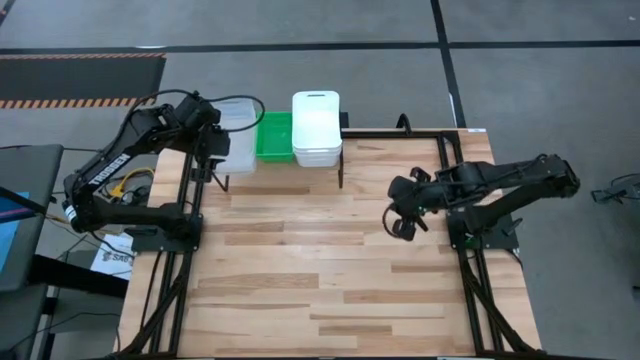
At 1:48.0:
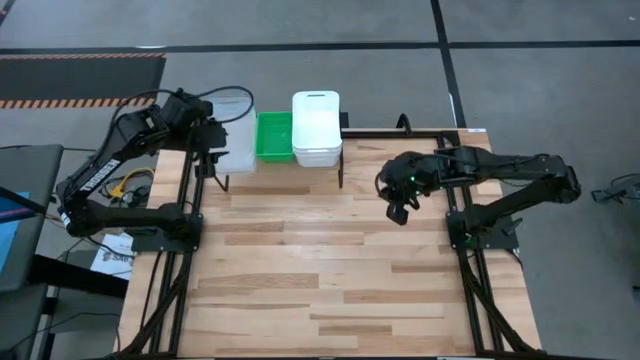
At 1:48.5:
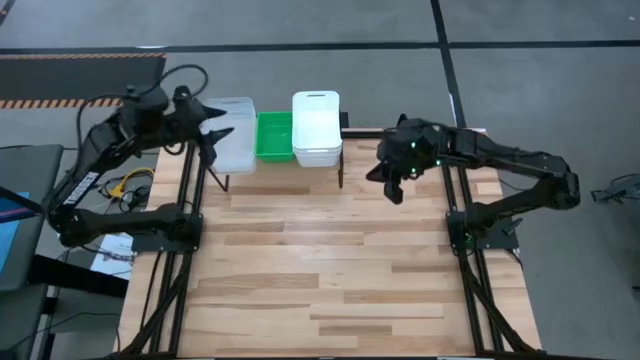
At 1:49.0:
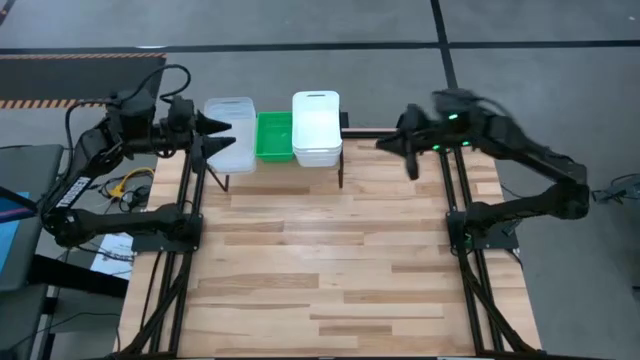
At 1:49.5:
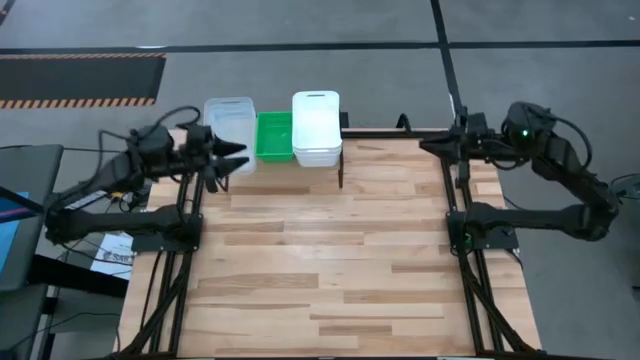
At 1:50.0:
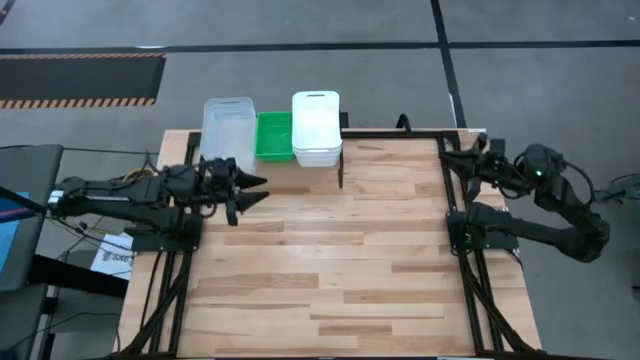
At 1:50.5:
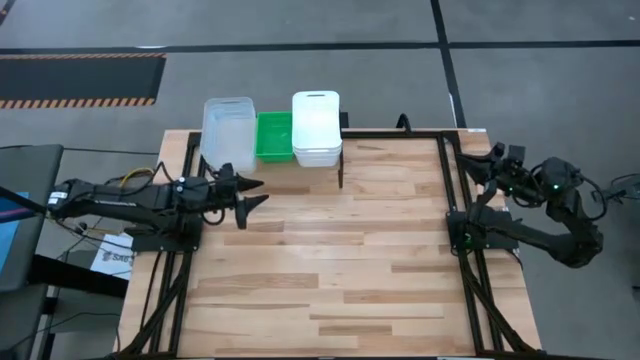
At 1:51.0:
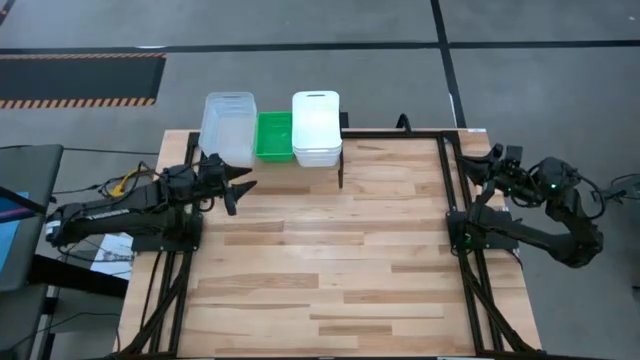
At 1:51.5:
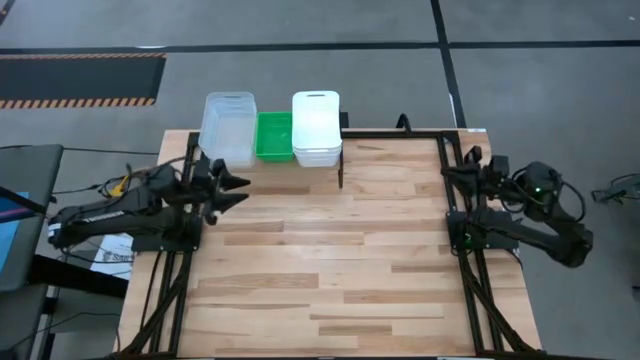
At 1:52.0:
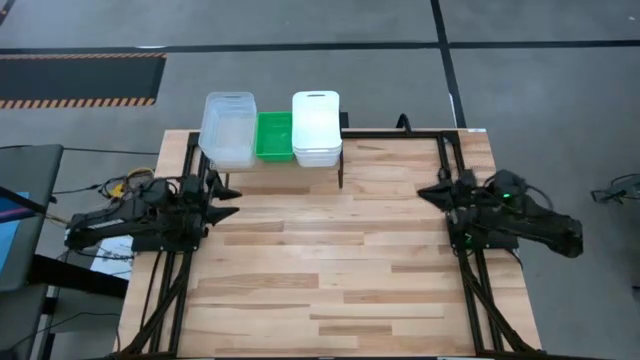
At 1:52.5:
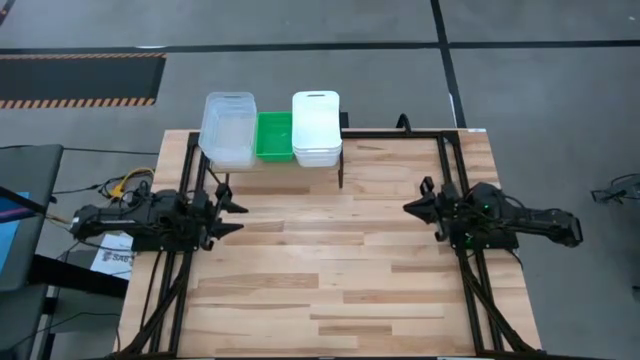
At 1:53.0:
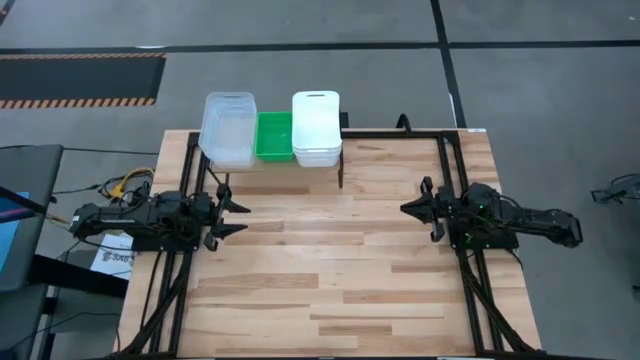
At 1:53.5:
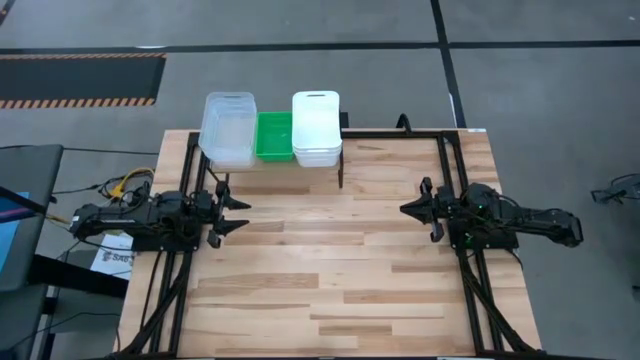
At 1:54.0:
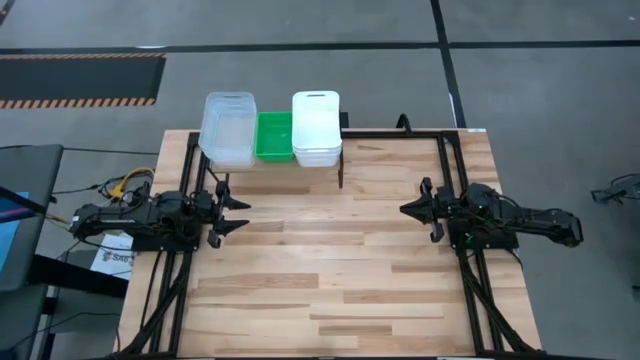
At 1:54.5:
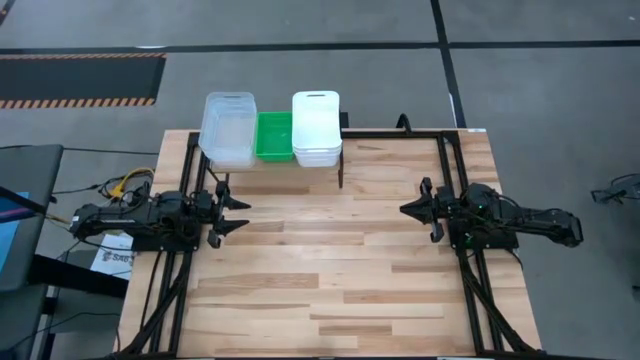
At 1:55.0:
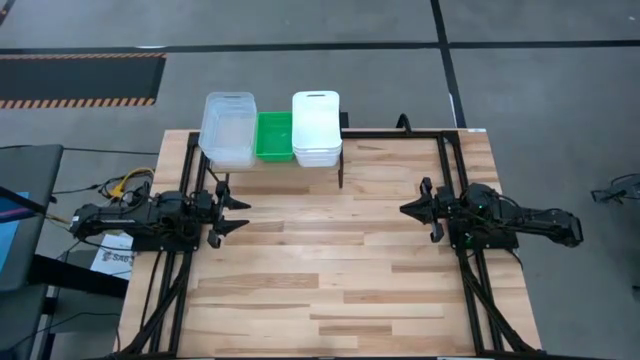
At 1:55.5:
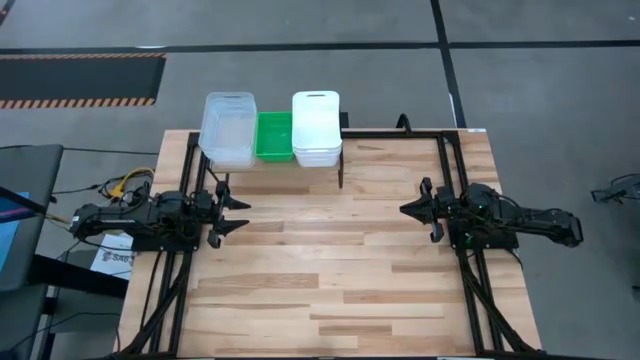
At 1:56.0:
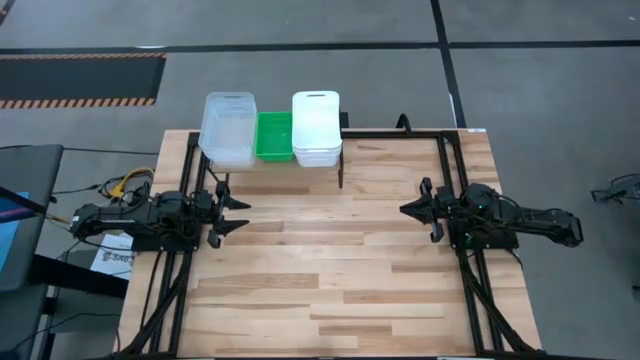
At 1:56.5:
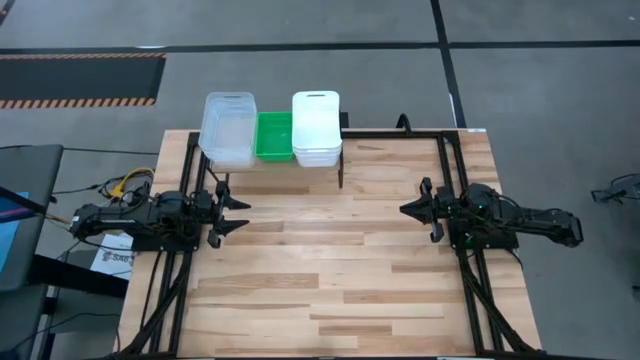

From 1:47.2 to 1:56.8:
Task: Stack baskets on shelf by color
Return to Home Position

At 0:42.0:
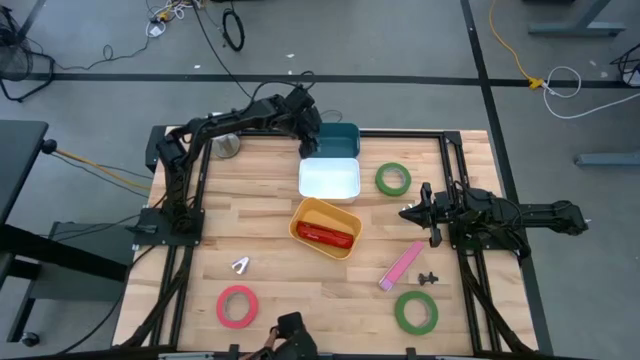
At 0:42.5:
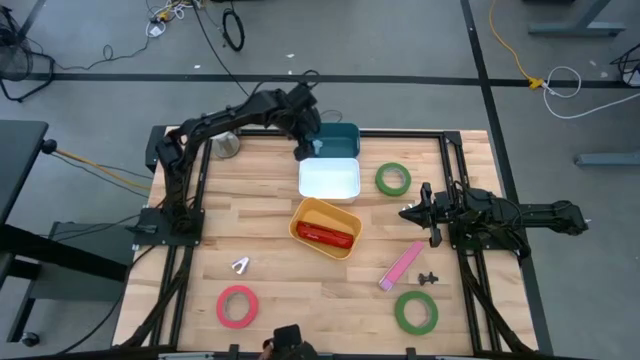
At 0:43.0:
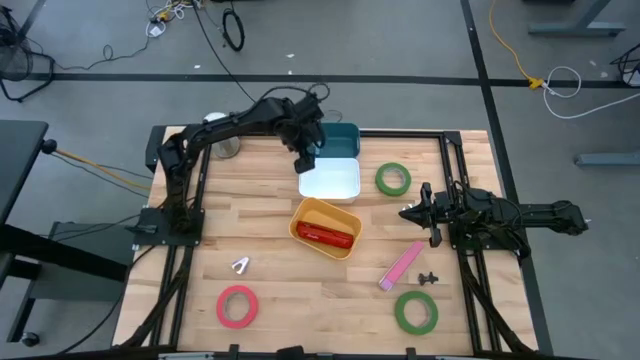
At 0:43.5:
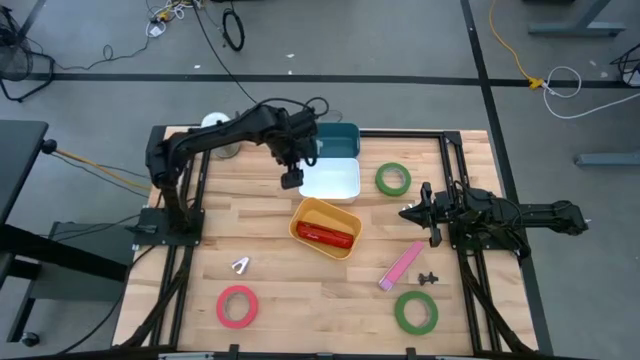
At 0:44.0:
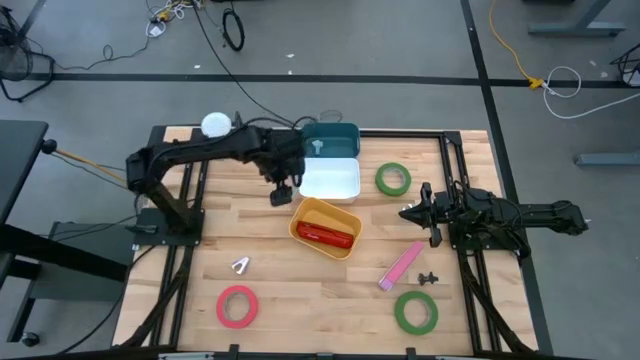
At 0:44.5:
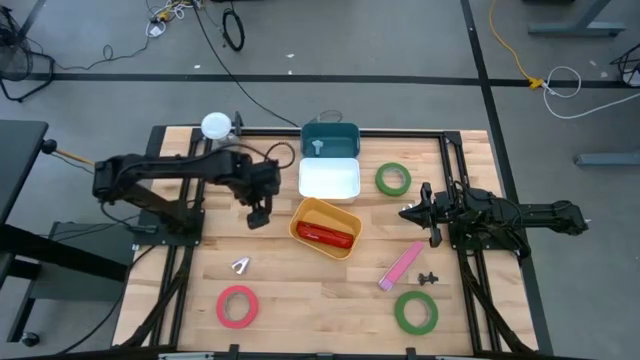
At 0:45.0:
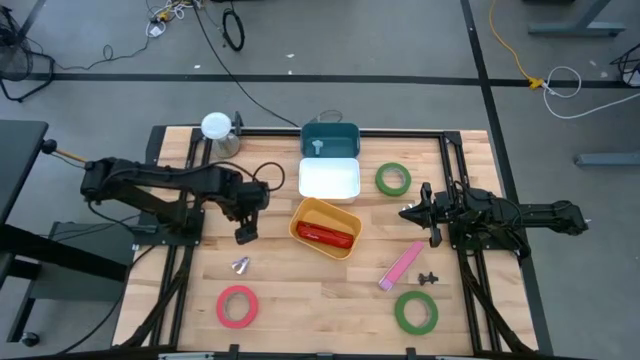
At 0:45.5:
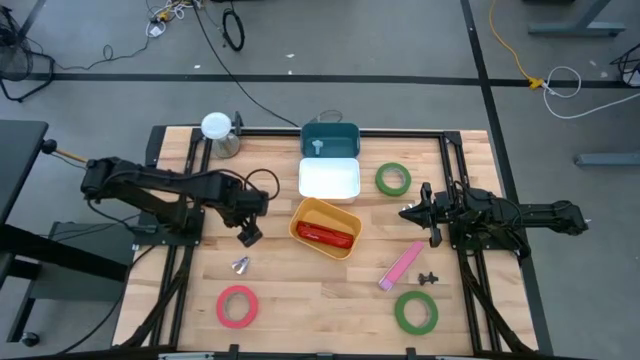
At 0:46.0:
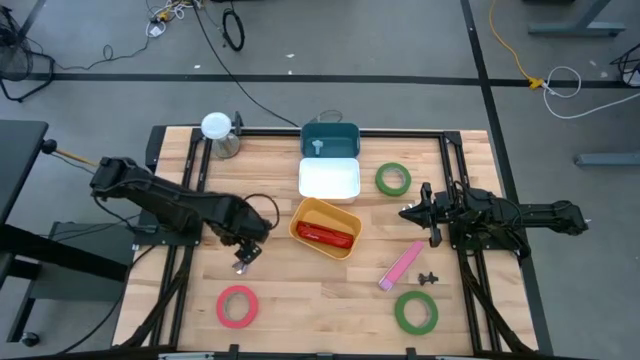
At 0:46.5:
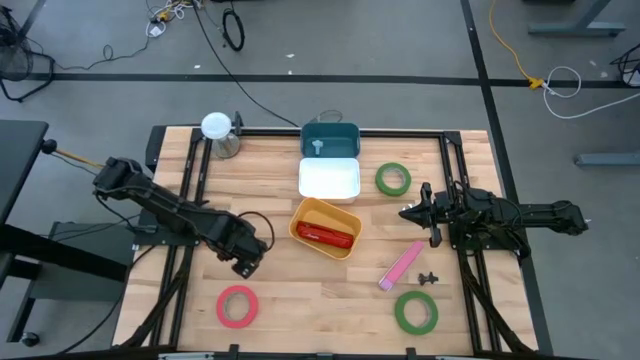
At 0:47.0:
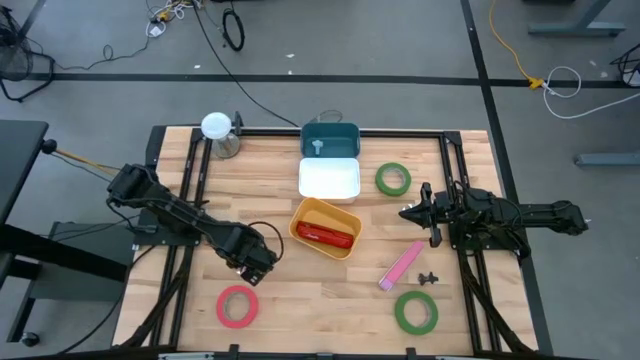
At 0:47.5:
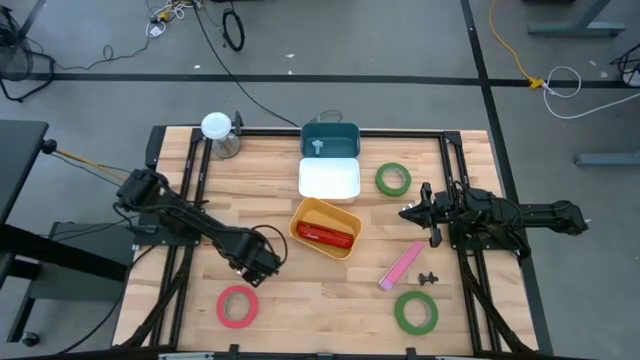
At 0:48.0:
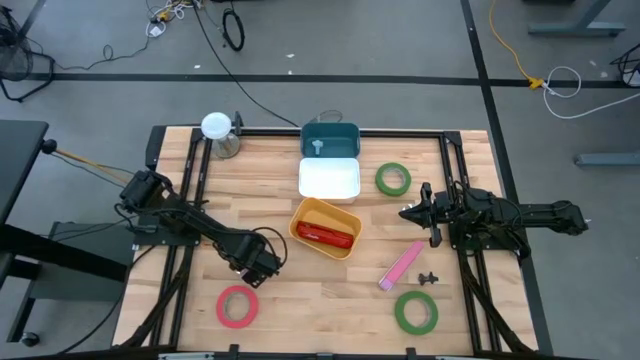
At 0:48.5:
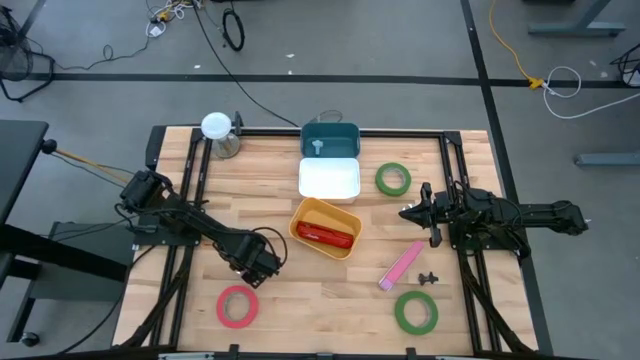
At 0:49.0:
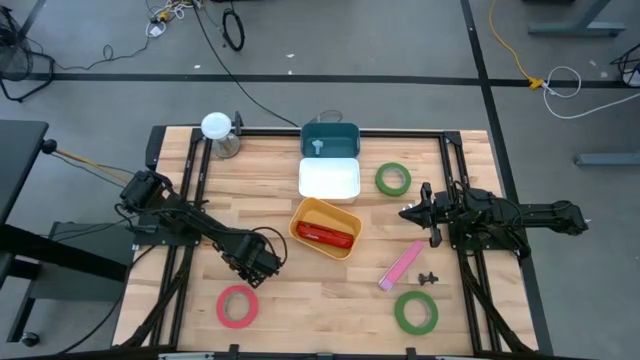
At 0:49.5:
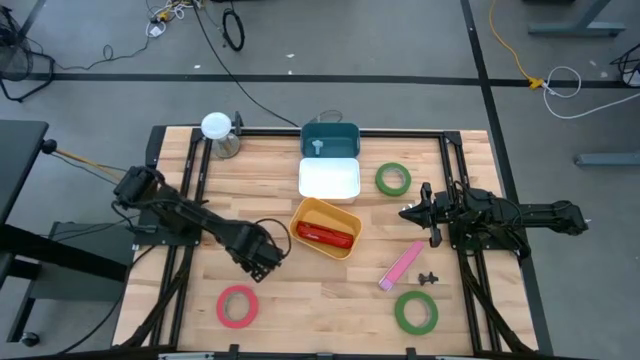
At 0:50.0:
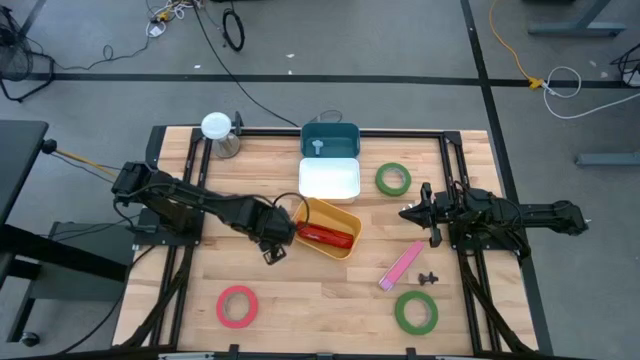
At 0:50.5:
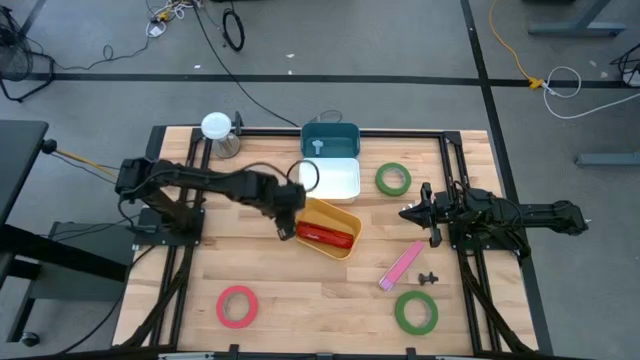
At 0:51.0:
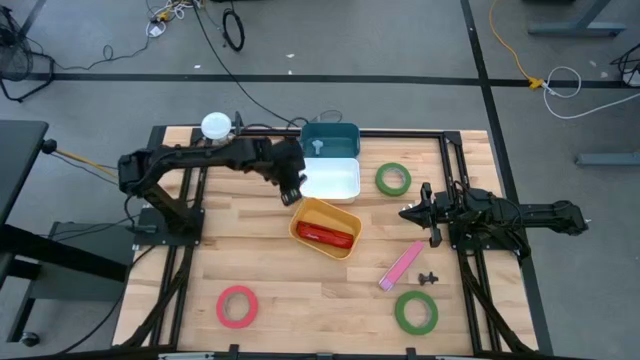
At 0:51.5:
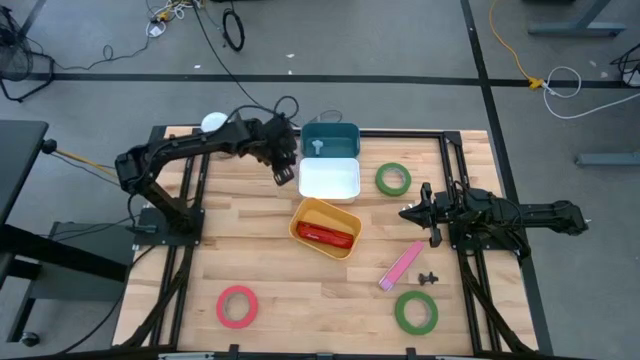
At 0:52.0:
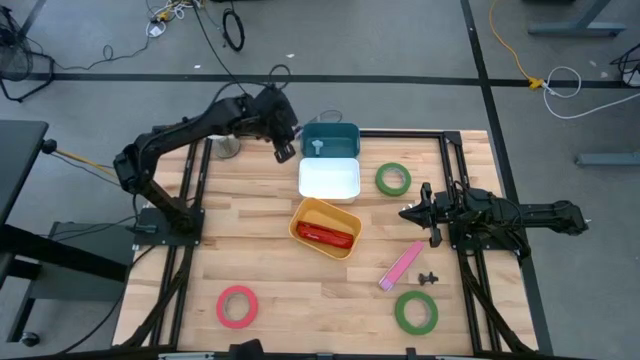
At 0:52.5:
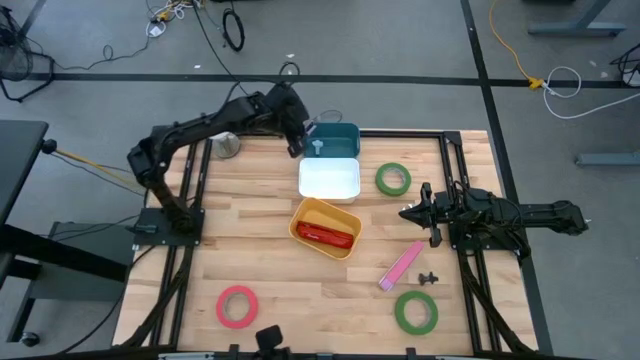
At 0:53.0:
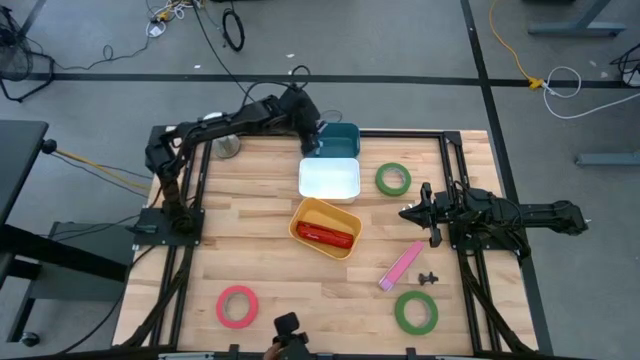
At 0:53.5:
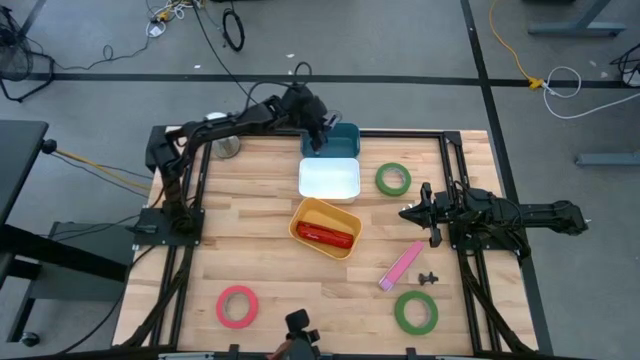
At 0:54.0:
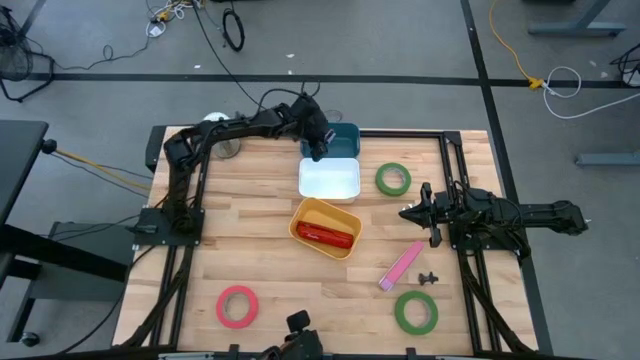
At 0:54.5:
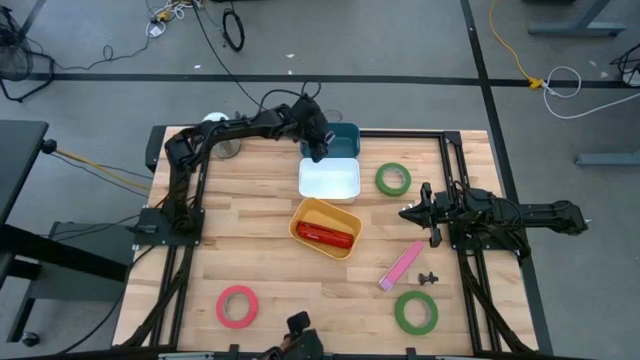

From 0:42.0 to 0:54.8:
Task: Pick and place Stapler, Stapler remover, tape
Put the violet stapler remover into the blue bin
